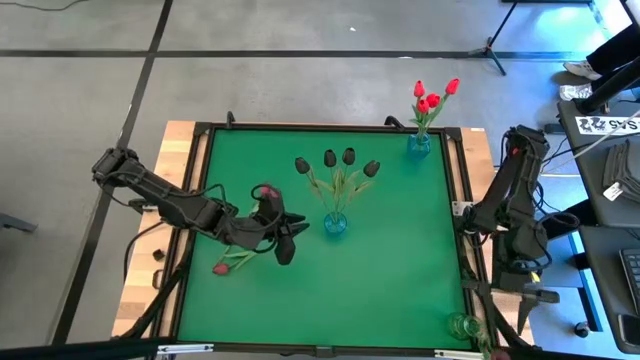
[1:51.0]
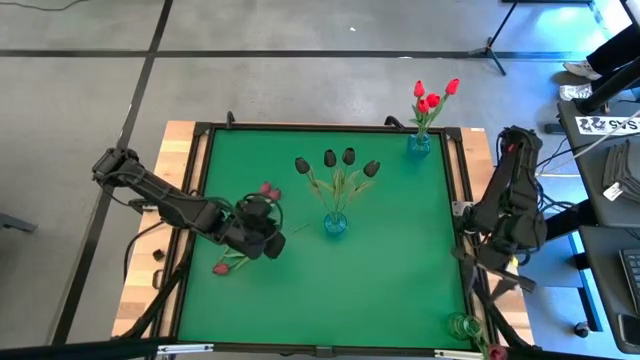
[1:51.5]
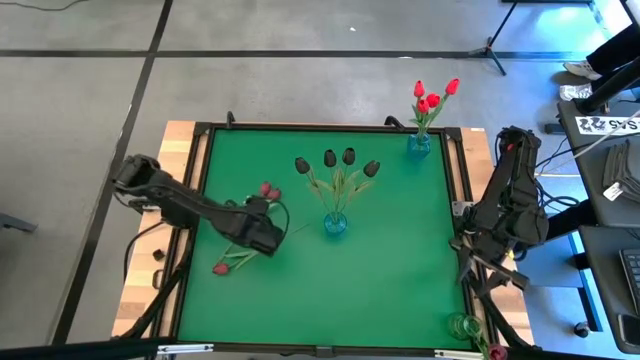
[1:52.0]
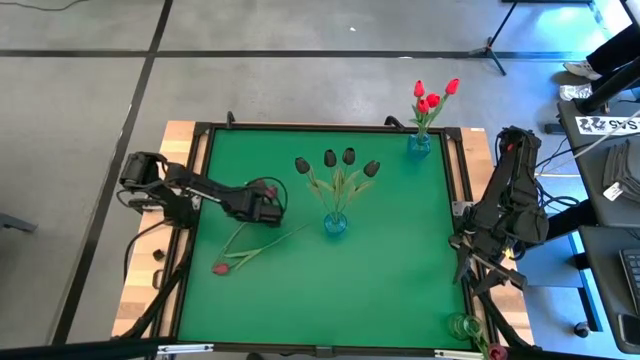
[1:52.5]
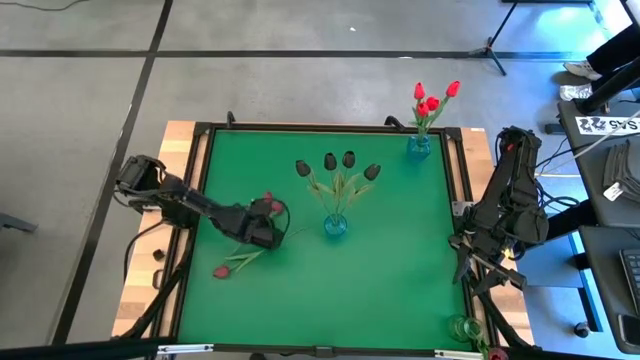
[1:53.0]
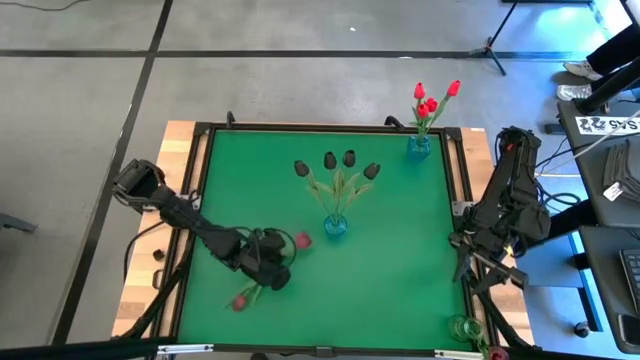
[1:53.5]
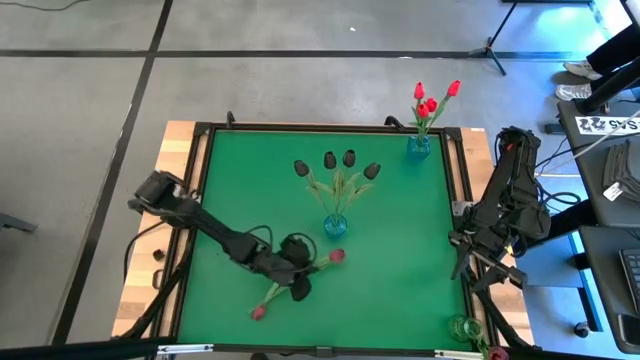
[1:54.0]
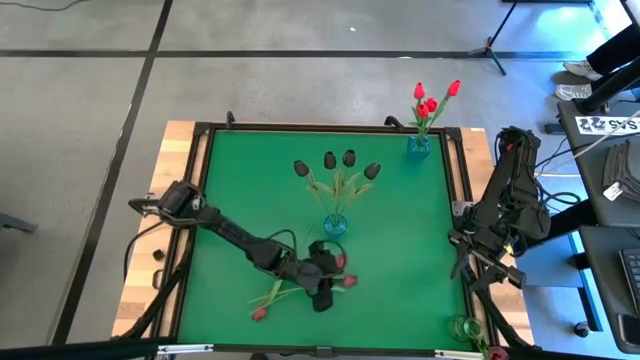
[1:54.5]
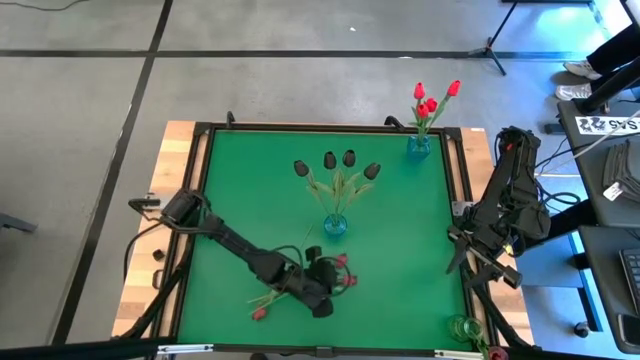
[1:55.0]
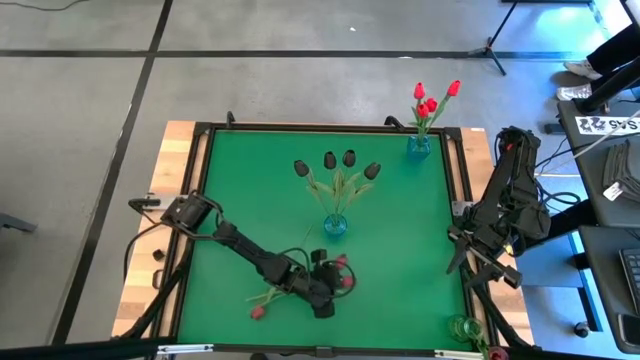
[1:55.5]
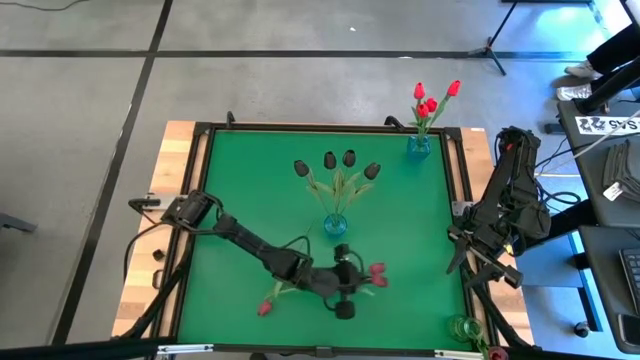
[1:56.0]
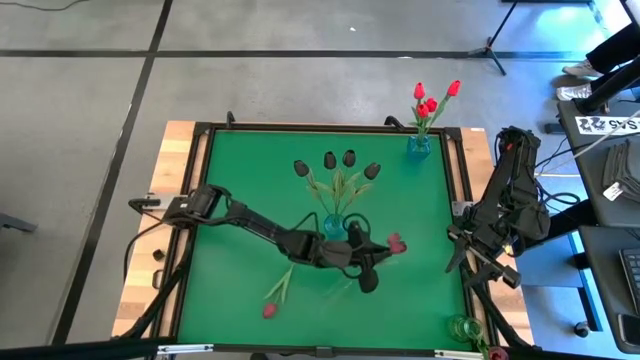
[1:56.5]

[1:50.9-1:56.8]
Task: Sort flowers into vase by color
Put the pink tulip into the green vase

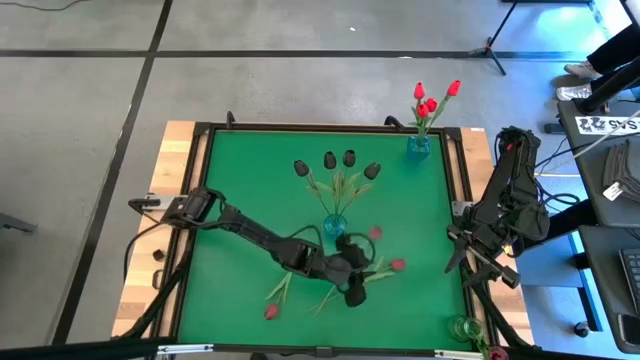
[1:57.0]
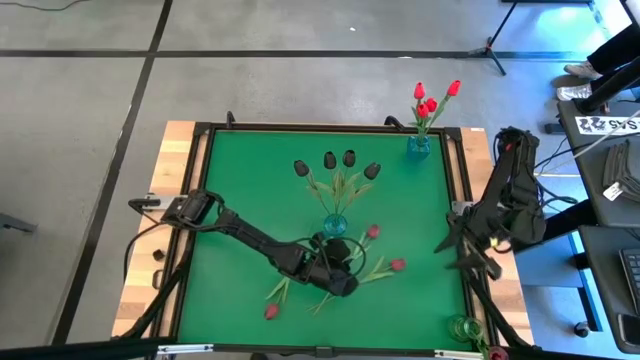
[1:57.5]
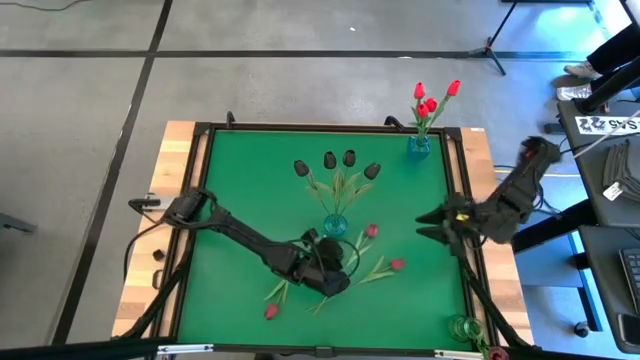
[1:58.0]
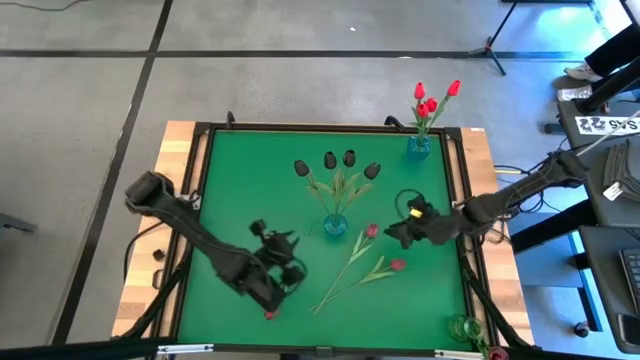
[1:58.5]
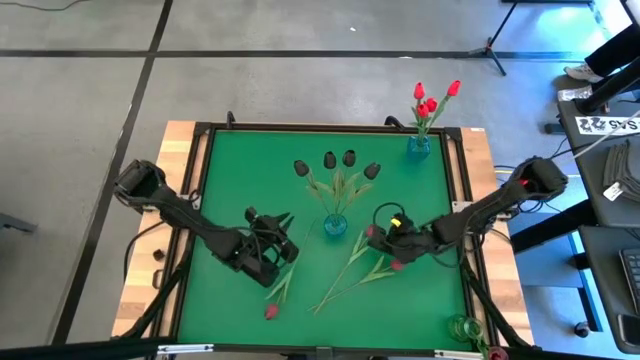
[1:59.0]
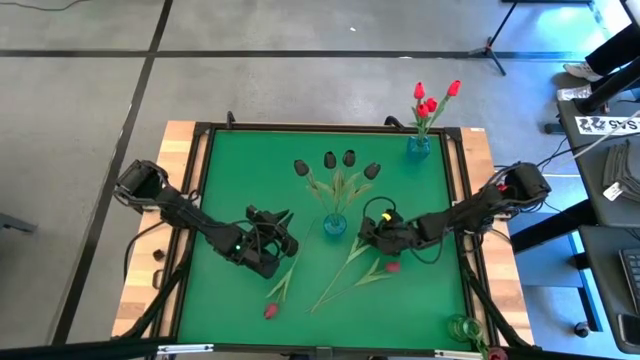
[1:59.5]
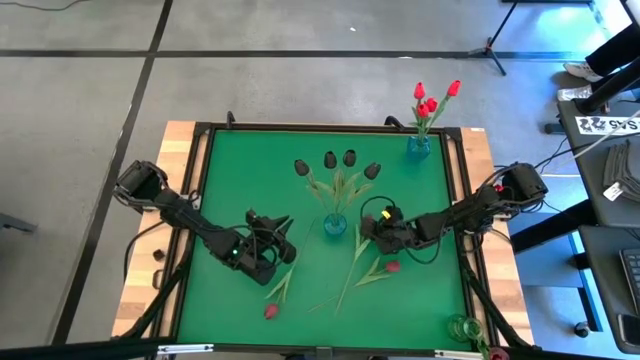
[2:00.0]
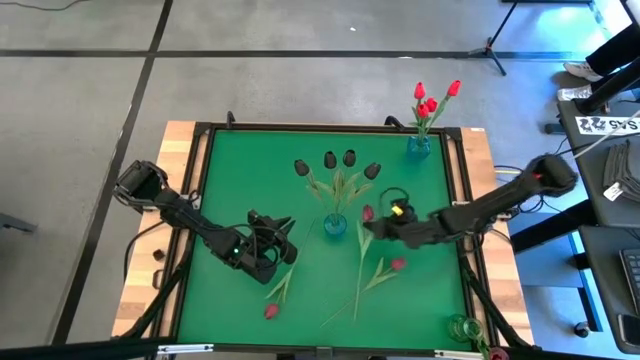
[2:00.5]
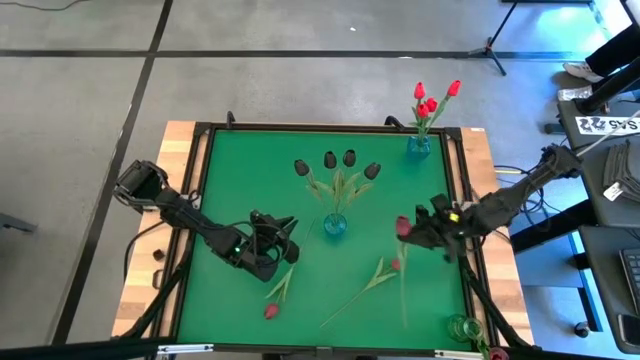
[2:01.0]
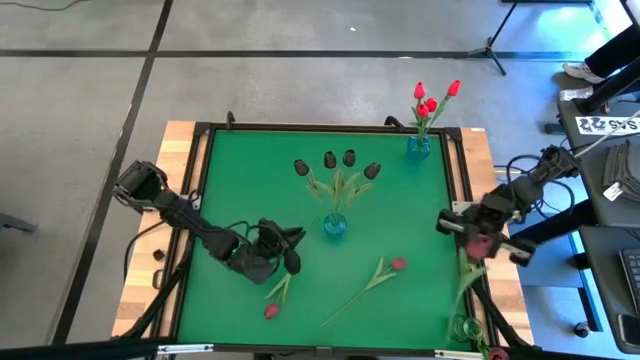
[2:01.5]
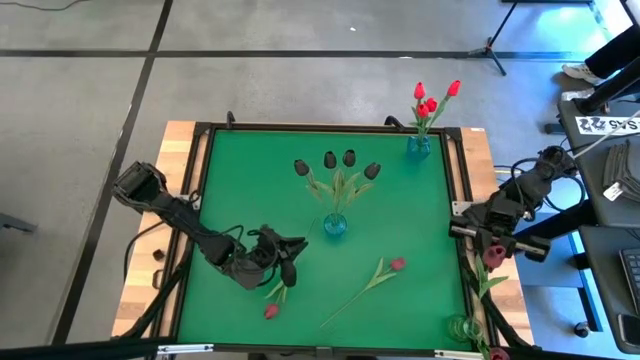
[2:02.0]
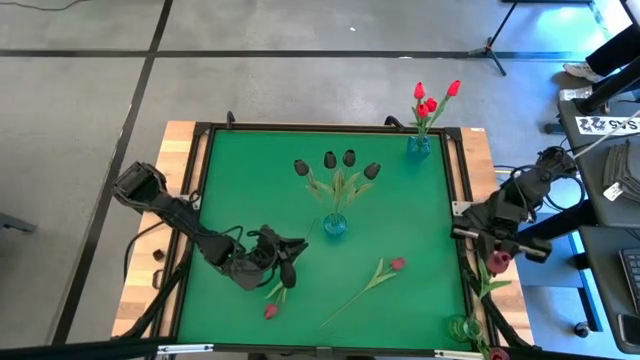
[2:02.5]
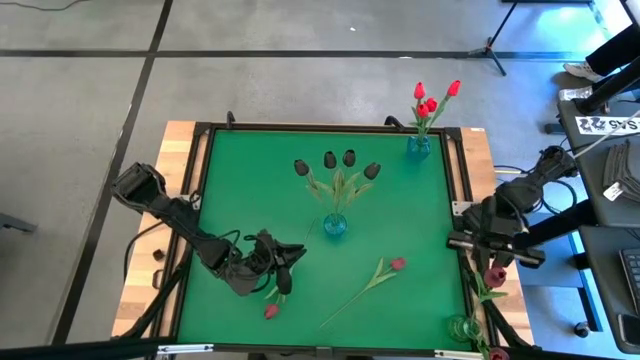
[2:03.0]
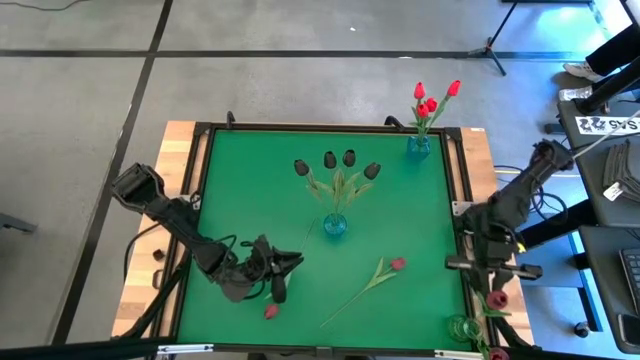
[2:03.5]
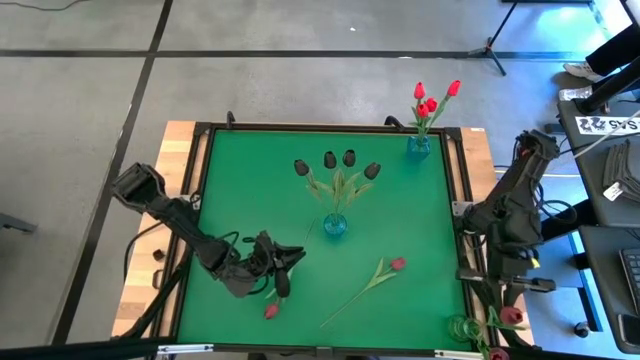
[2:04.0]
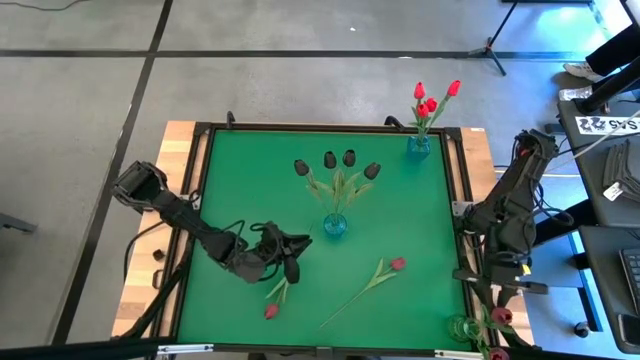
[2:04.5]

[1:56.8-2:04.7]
Put the pink tulip into the green vase

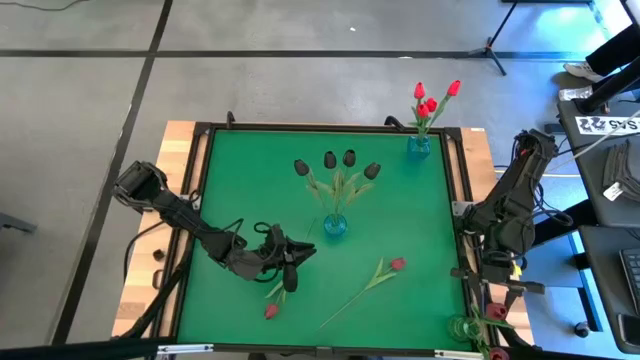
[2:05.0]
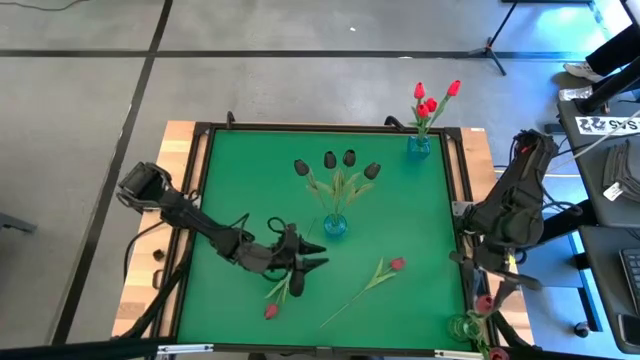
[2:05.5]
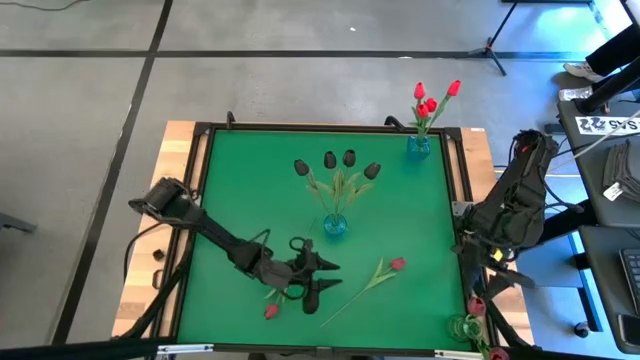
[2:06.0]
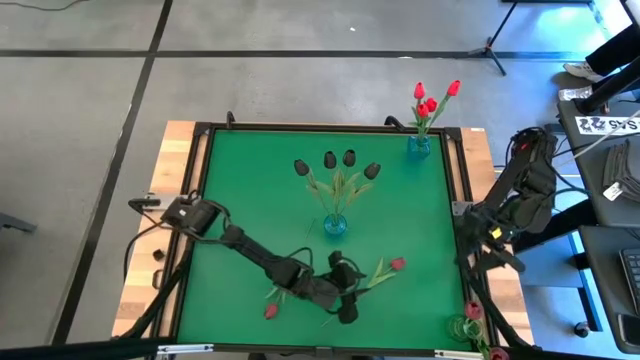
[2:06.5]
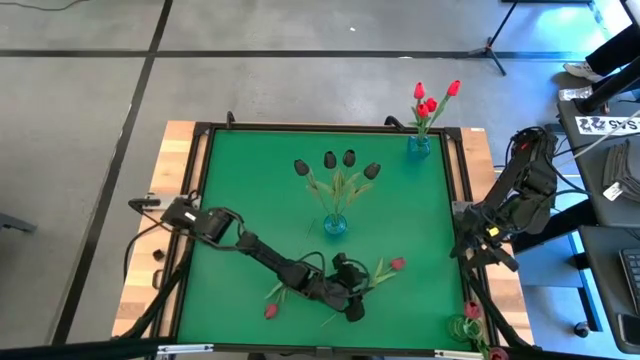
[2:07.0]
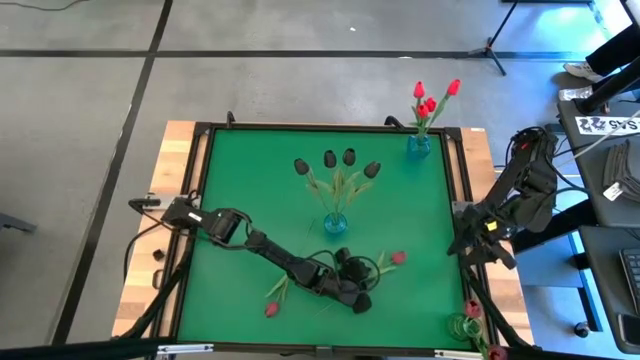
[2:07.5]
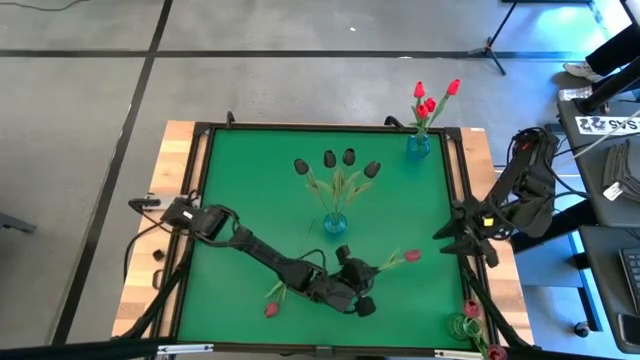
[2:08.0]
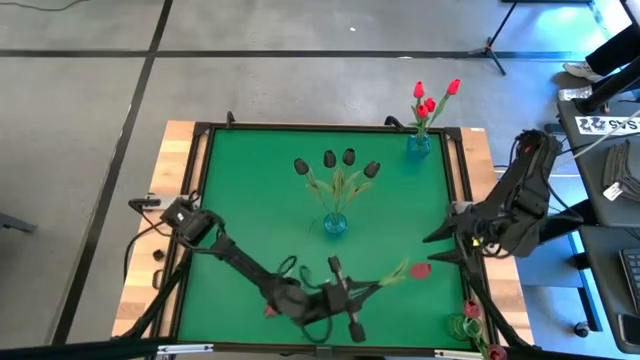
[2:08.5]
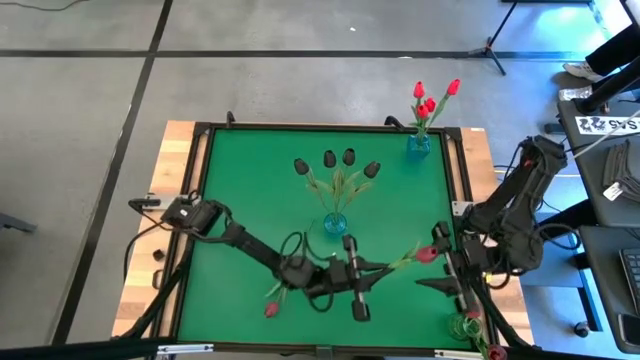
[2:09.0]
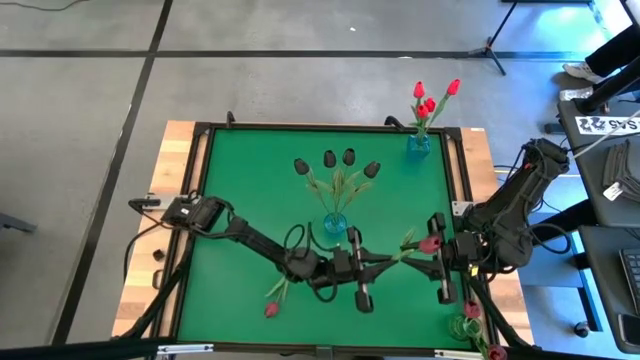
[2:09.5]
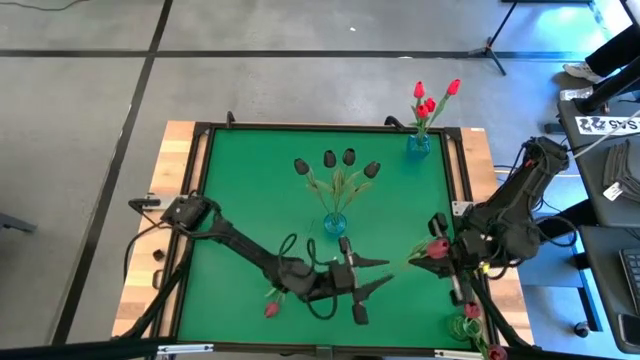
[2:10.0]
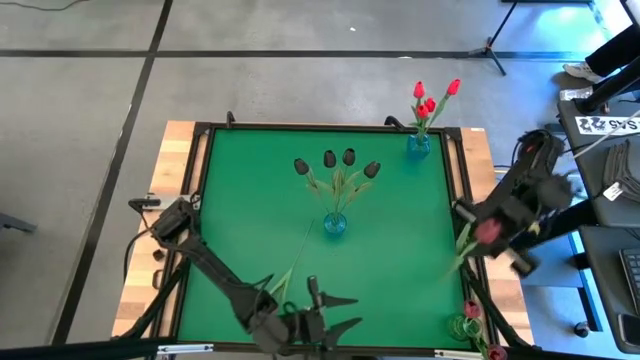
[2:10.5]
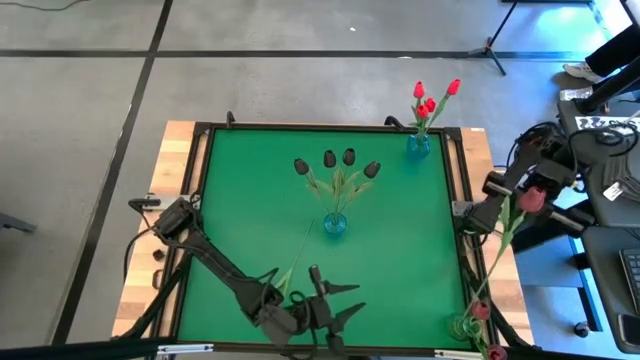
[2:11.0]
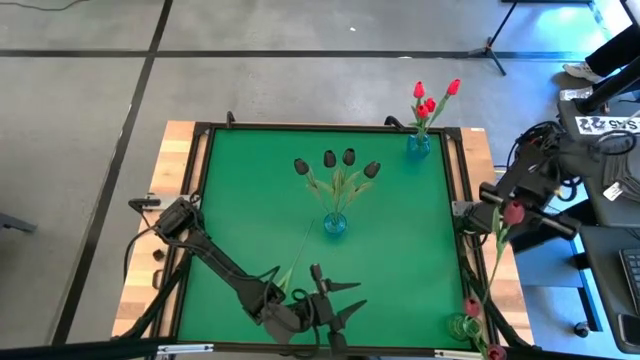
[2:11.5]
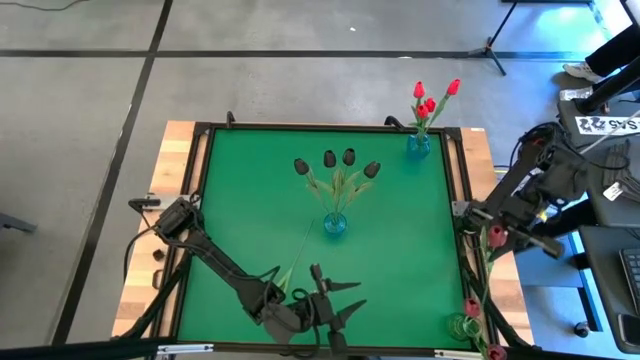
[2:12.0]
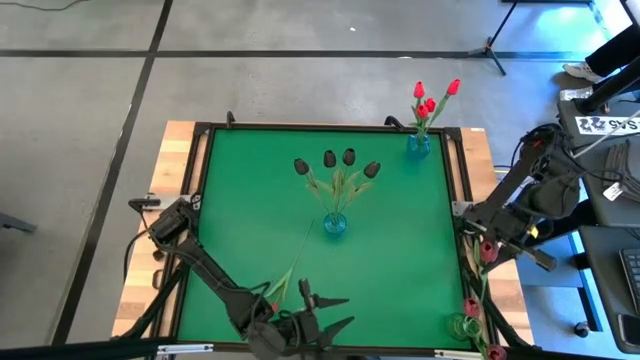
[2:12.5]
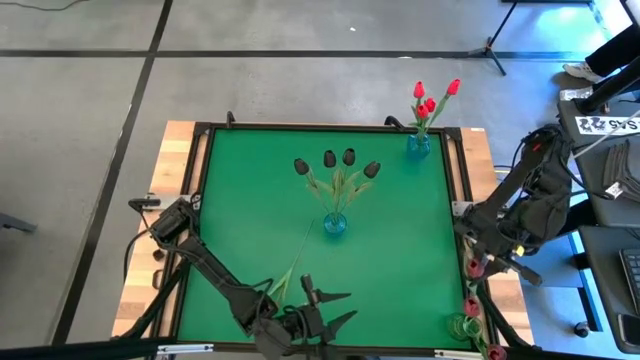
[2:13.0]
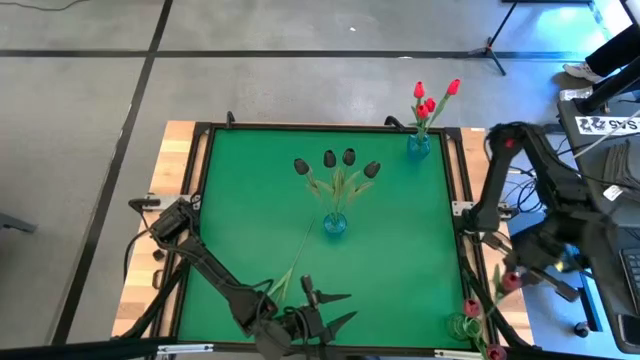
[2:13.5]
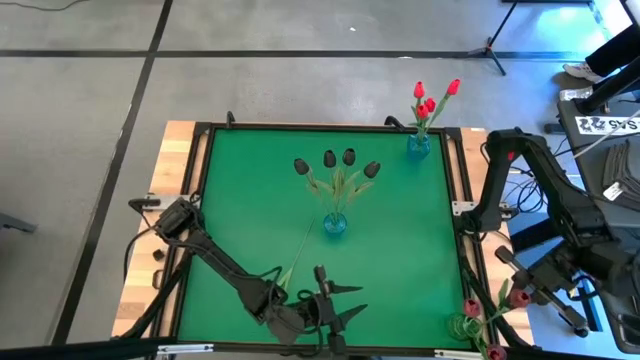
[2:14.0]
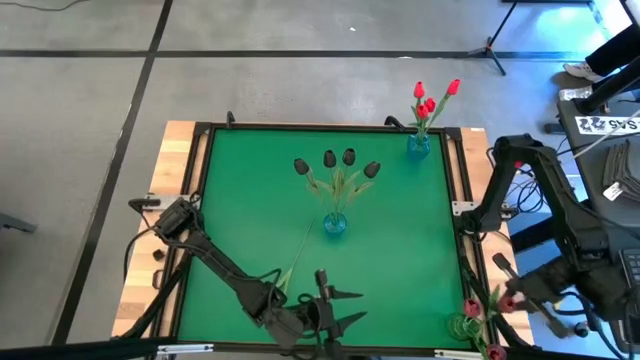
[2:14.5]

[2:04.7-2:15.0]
Put the pink tulip into the green vase
